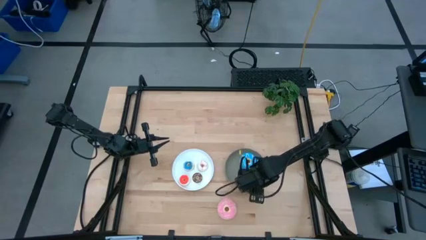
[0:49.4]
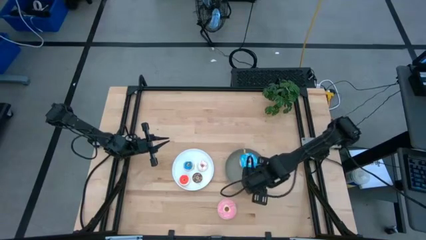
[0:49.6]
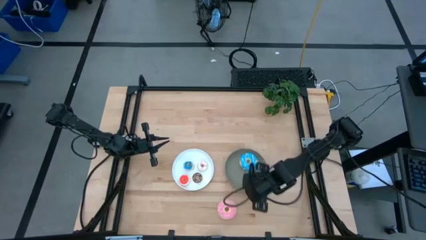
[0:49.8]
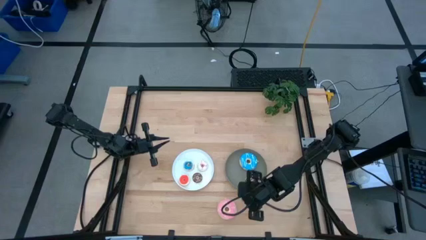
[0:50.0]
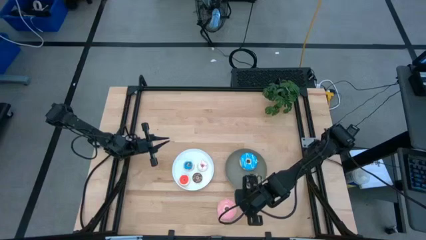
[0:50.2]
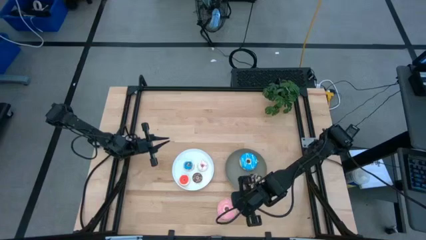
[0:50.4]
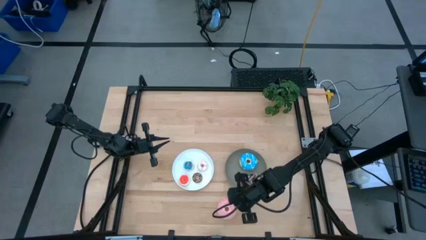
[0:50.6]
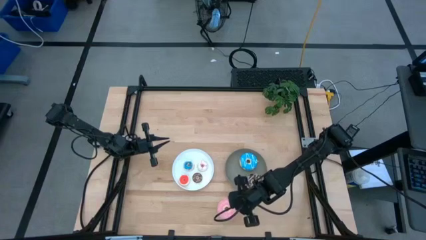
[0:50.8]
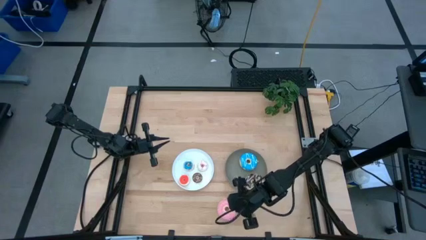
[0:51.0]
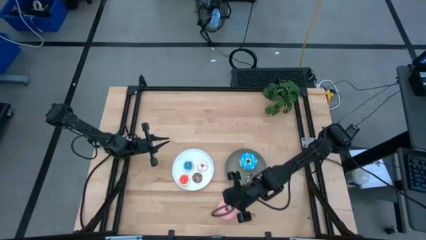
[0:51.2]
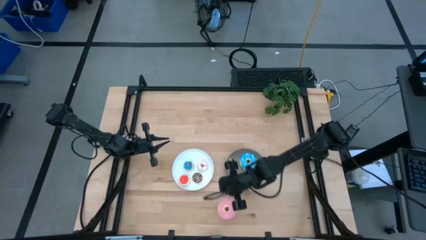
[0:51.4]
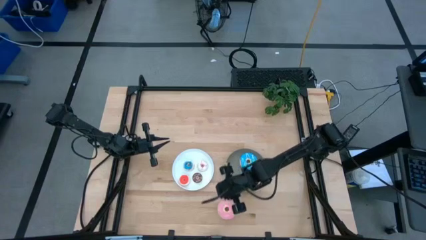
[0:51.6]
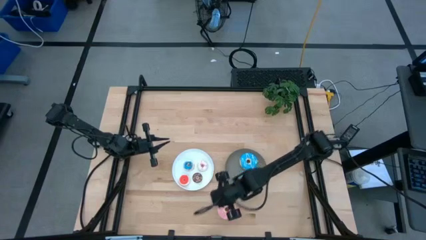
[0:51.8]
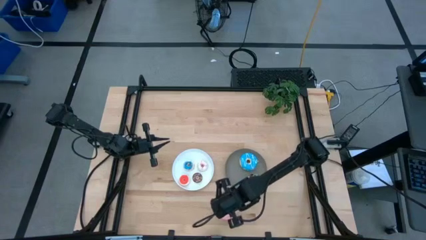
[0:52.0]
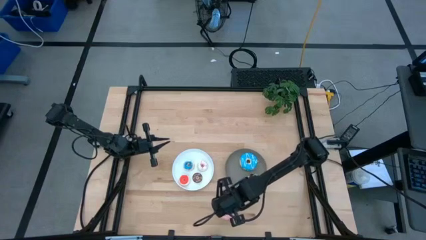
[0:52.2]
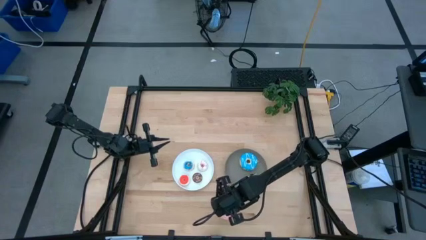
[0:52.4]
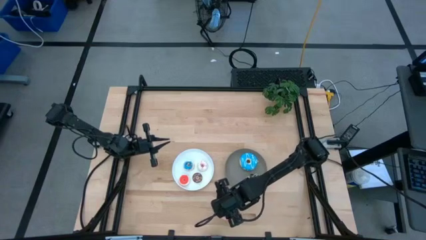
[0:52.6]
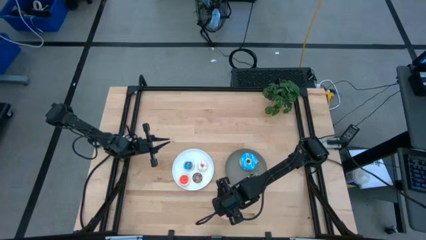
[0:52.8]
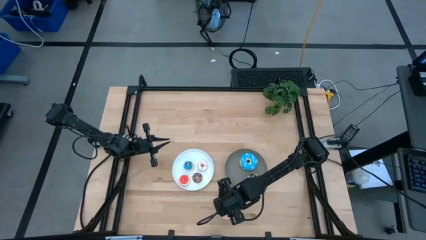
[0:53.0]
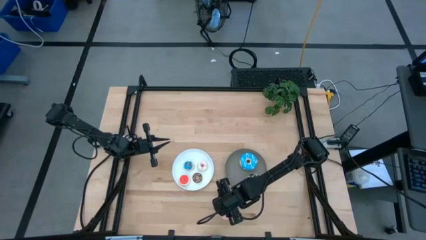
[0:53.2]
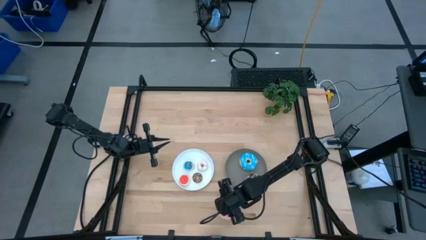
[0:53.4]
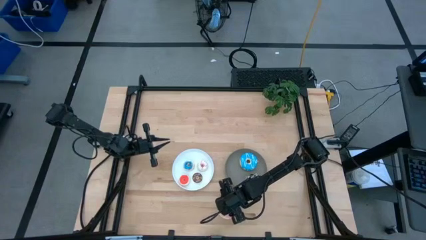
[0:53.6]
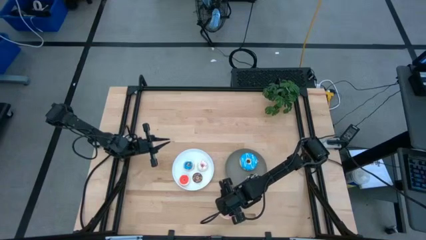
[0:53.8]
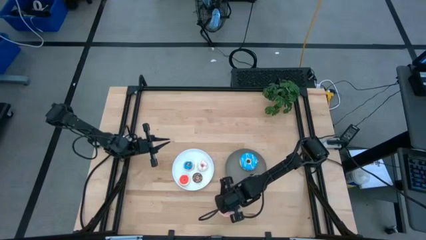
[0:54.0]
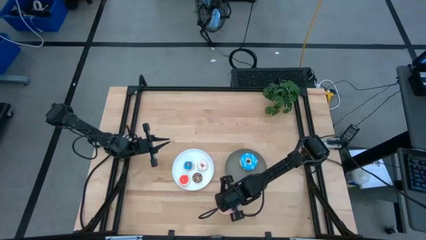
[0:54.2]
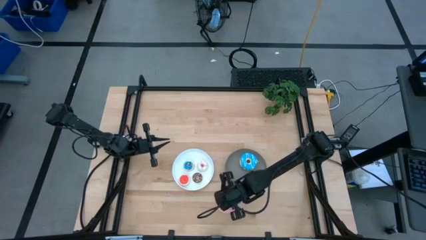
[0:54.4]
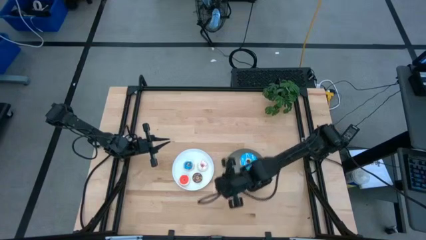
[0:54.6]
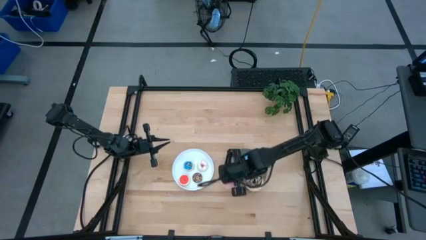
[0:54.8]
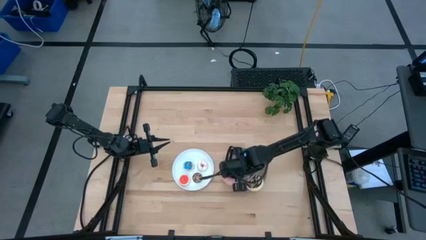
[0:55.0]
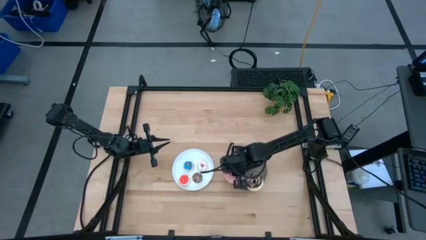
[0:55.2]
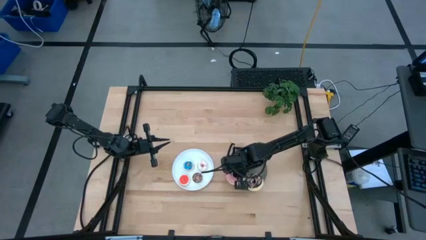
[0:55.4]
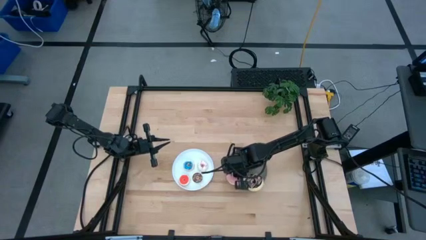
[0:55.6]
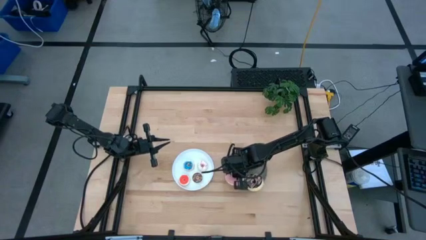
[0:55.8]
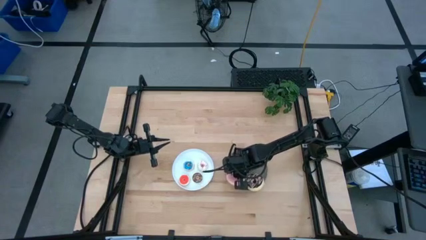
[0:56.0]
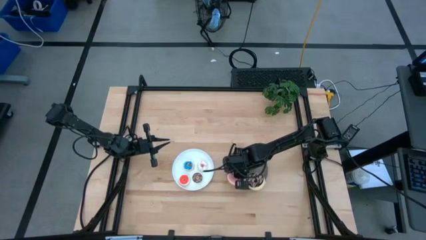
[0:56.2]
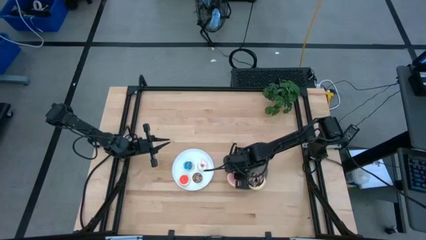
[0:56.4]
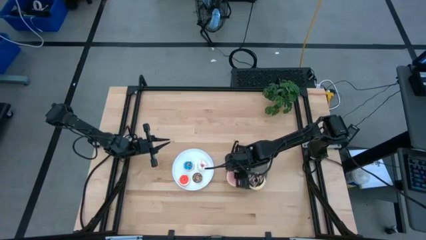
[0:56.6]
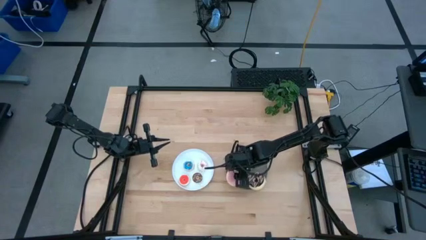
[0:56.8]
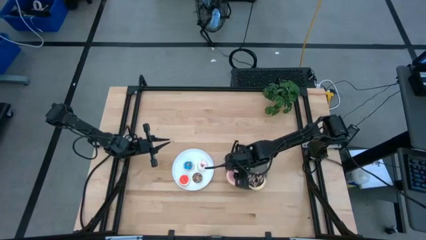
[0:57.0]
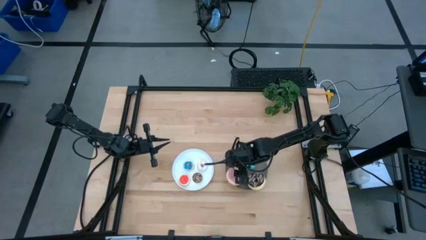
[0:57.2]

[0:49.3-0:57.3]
Task: Pick & Place donuts
Put the large pink donut on the gray plate

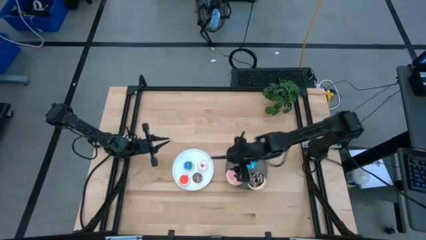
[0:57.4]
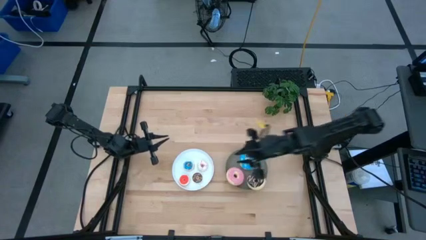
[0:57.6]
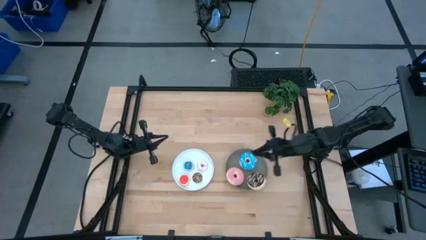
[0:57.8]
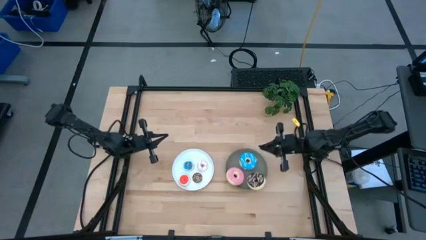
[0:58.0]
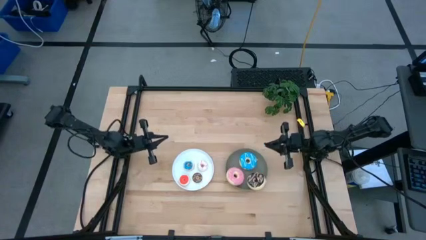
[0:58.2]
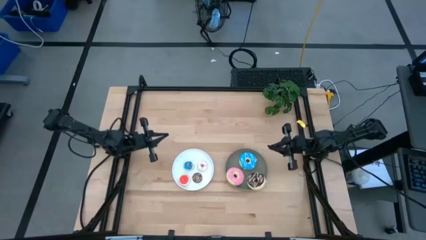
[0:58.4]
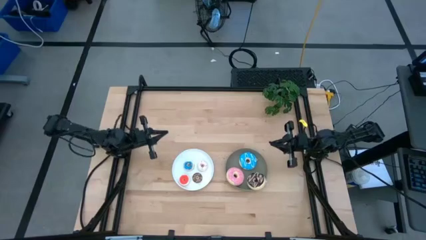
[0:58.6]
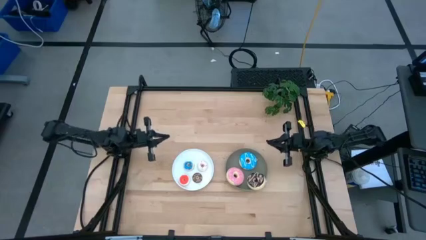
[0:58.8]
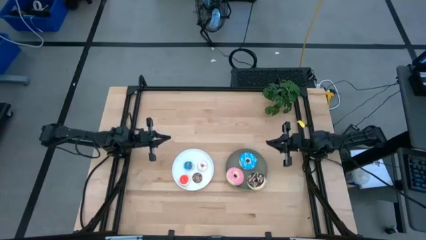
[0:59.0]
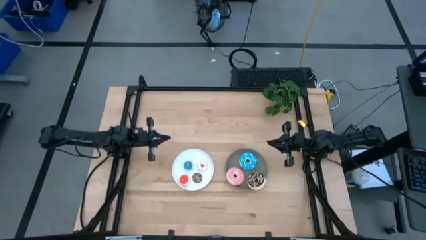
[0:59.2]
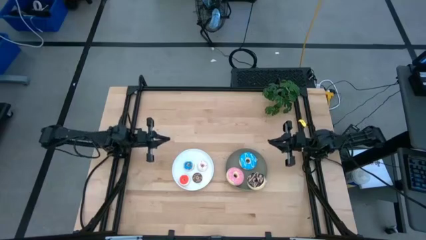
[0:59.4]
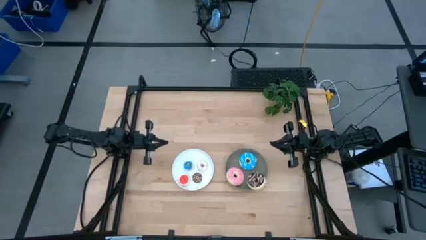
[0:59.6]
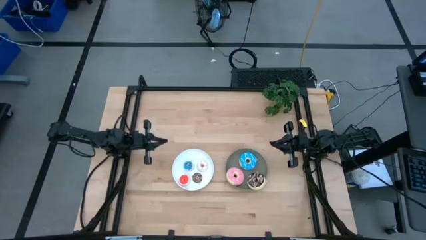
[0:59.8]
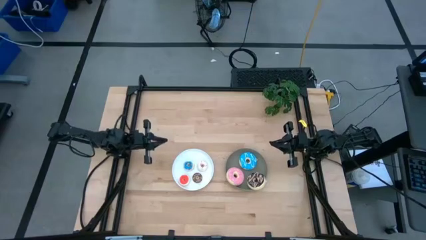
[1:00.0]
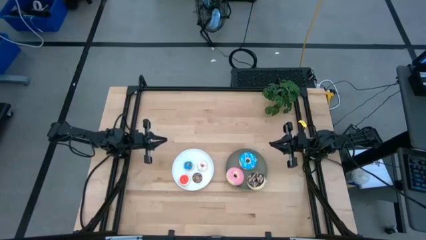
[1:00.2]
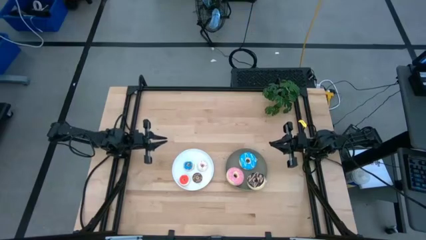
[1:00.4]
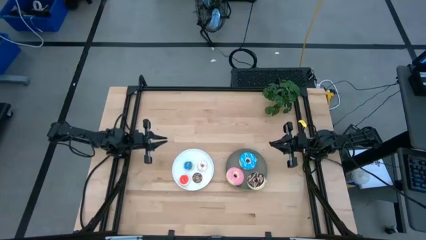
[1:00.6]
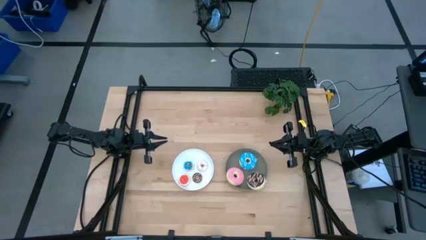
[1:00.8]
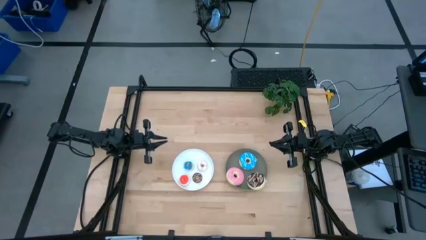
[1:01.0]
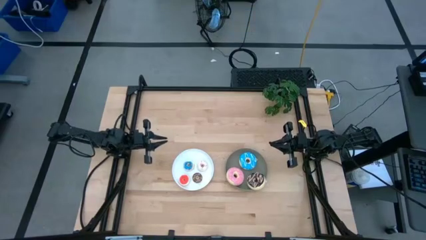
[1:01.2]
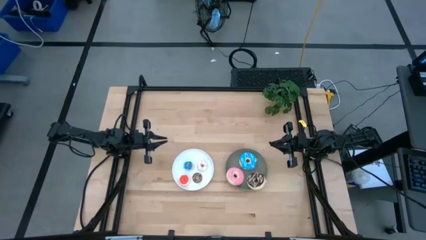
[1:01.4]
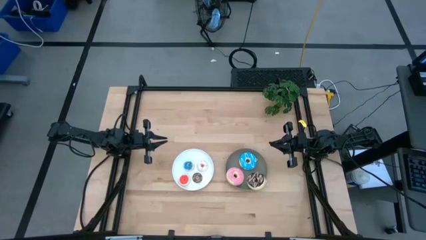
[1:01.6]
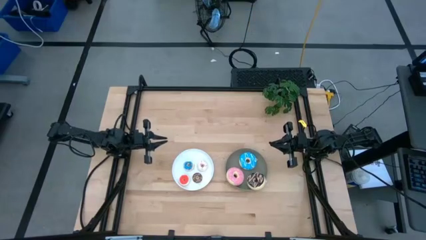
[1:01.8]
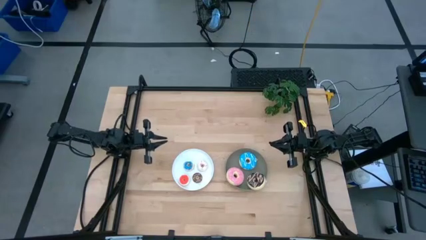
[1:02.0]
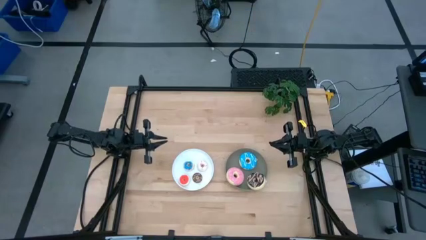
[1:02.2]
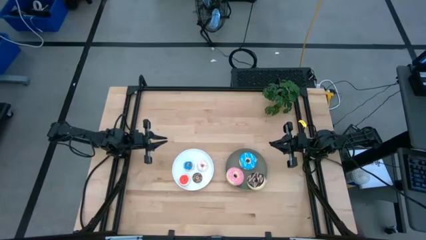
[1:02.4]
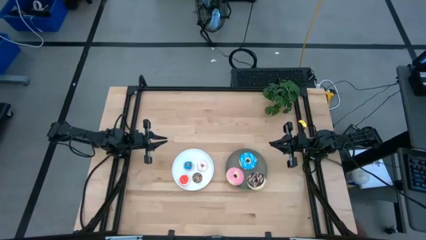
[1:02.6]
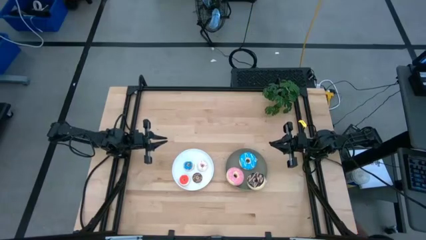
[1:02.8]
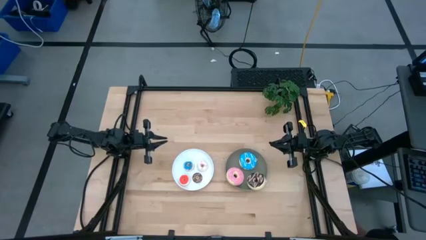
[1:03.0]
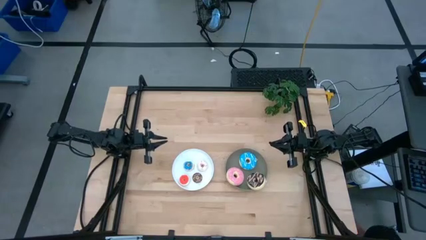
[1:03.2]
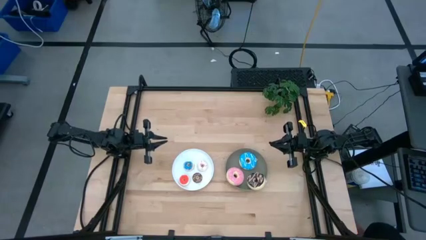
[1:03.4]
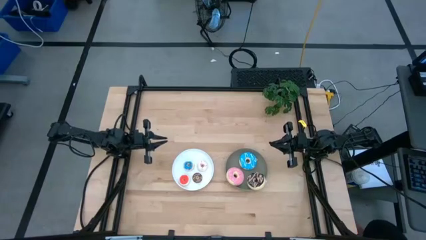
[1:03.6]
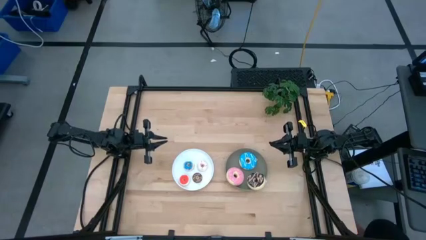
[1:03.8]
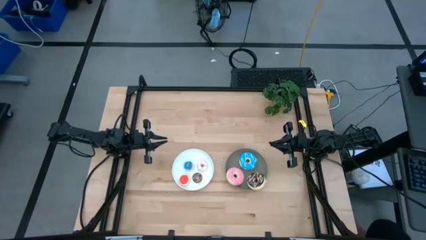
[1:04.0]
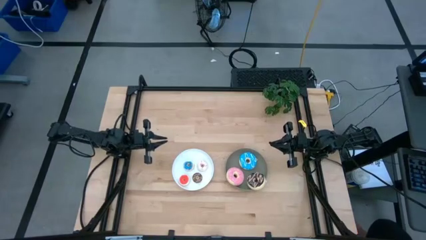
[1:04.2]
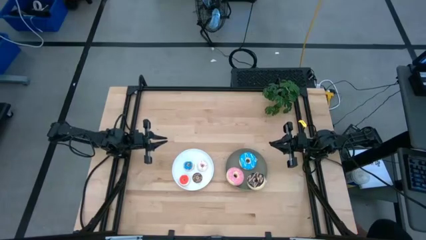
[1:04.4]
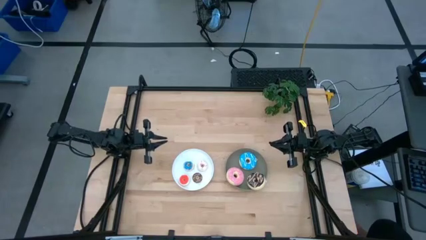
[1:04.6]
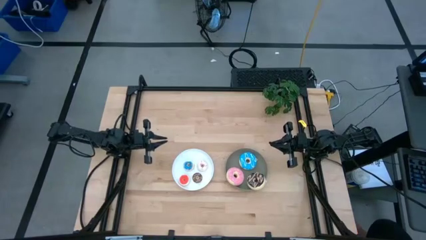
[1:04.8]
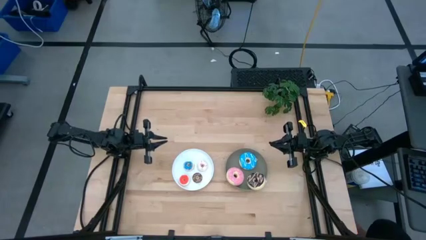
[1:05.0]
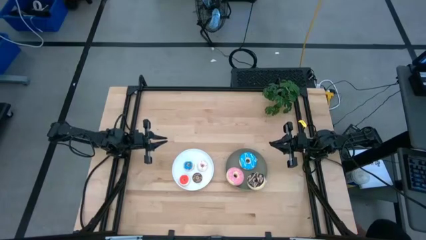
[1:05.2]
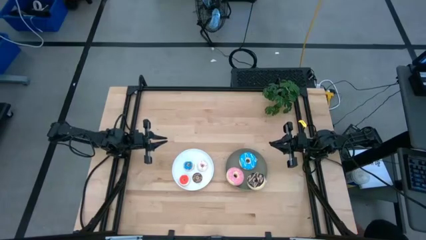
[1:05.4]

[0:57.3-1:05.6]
Return to Home Position

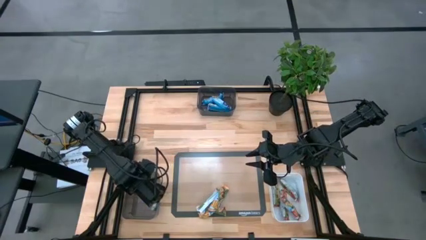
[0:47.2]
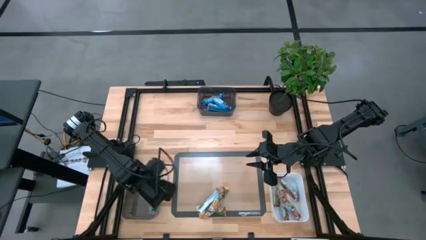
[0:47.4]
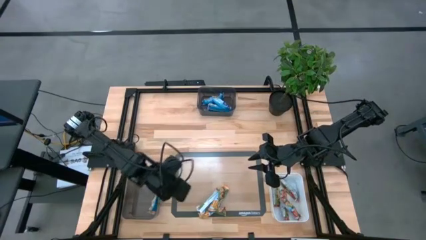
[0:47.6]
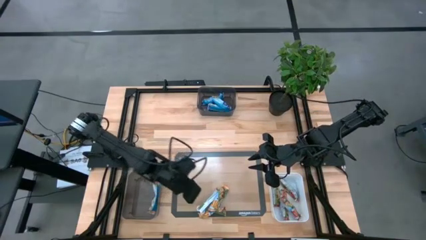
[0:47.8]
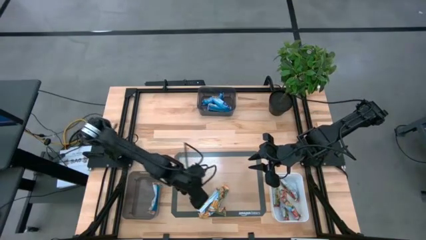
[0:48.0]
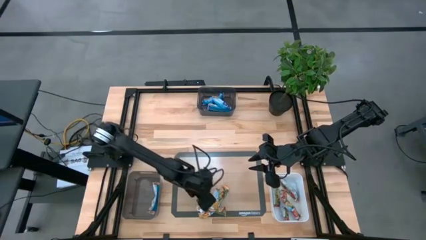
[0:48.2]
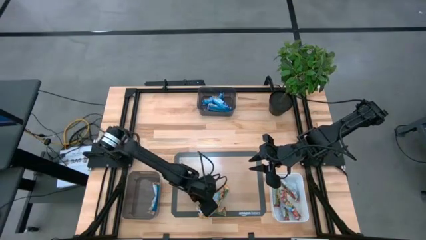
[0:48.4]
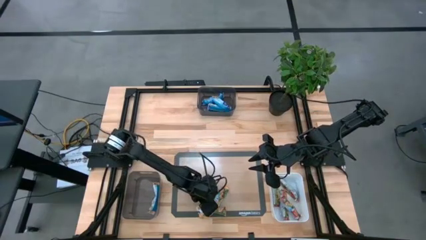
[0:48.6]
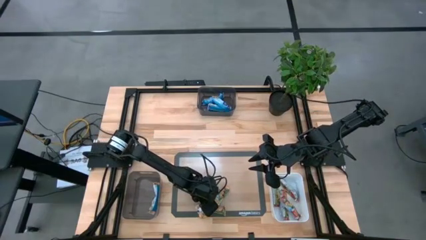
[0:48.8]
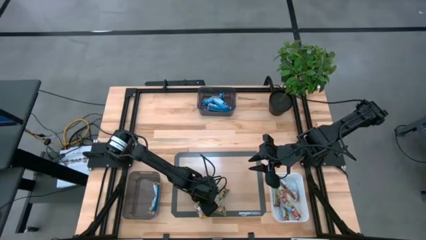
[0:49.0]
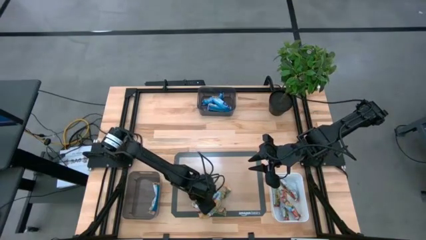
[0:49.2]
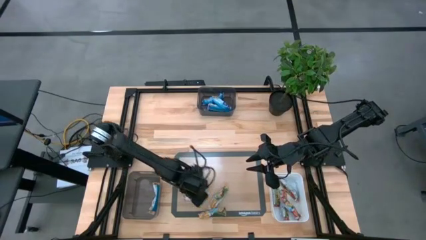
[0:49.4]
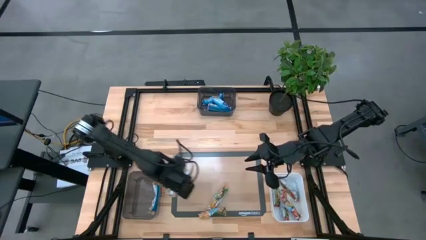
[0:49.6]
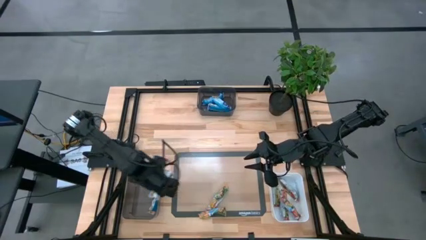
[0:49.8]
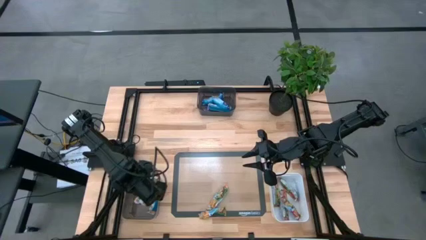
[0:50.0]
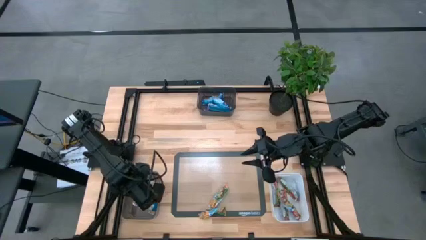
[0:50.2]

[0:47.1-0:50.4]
Task: Pick and place Granola Bars by type
Put the orange granola bar into the bottom black bin
